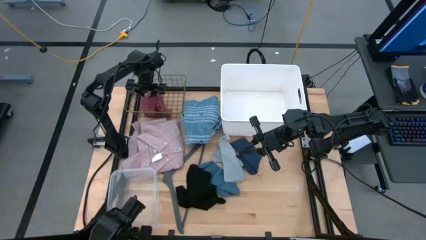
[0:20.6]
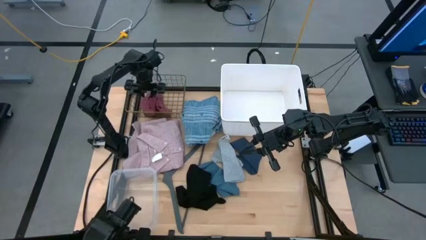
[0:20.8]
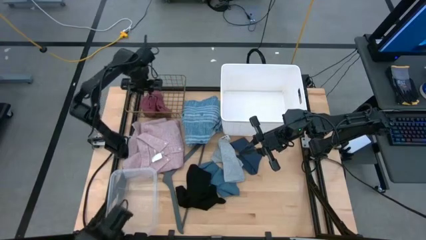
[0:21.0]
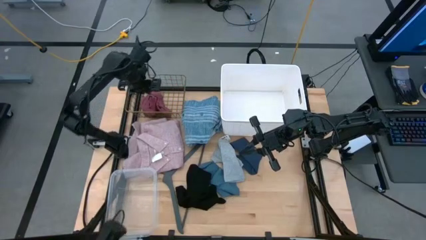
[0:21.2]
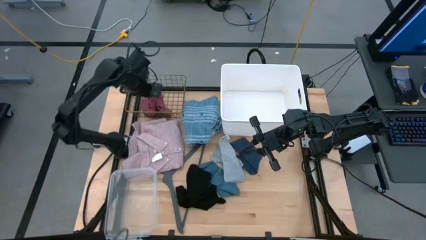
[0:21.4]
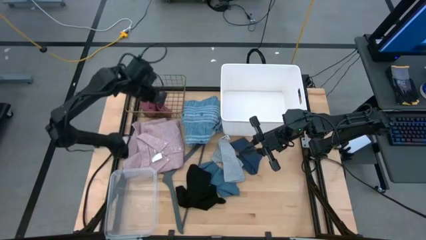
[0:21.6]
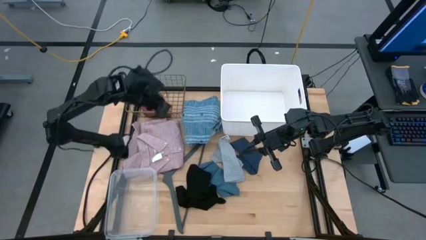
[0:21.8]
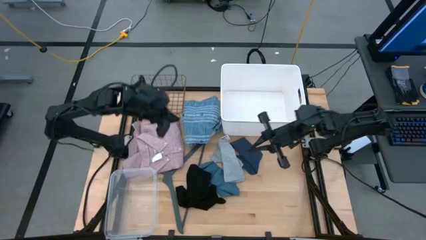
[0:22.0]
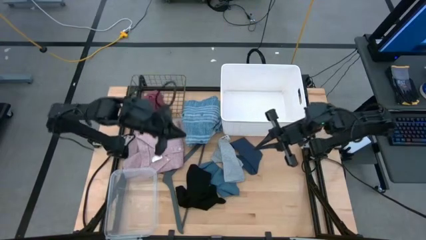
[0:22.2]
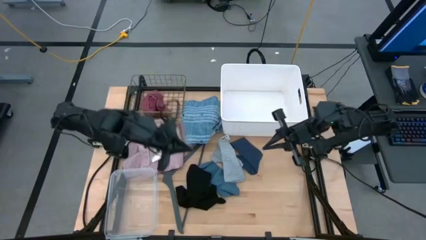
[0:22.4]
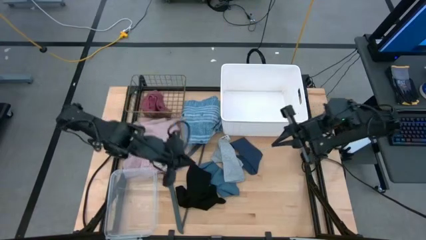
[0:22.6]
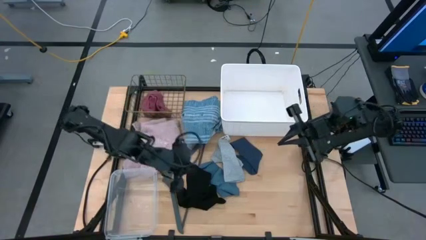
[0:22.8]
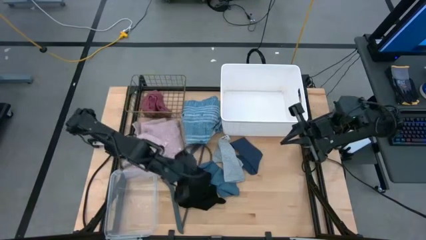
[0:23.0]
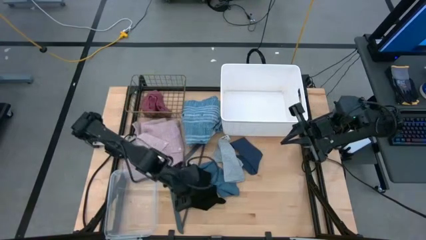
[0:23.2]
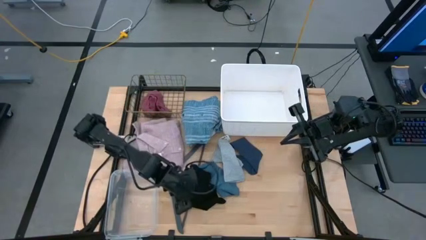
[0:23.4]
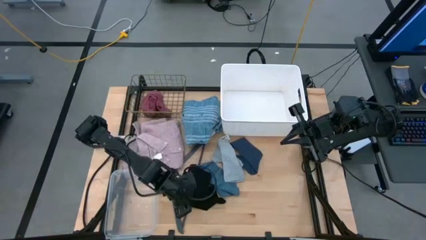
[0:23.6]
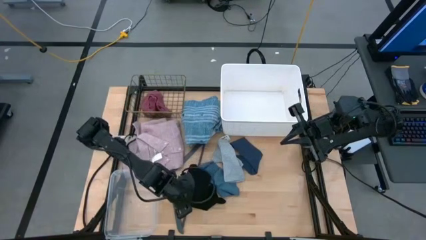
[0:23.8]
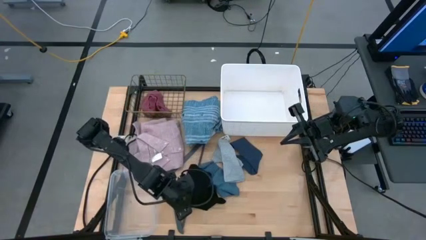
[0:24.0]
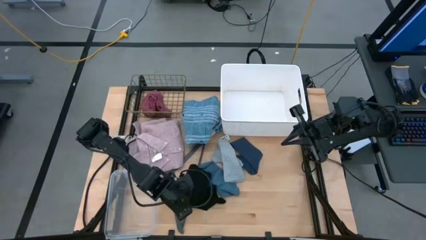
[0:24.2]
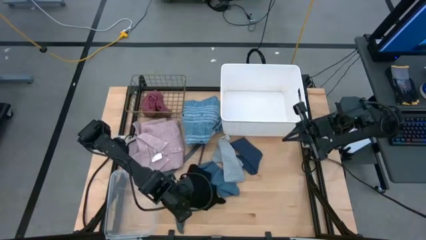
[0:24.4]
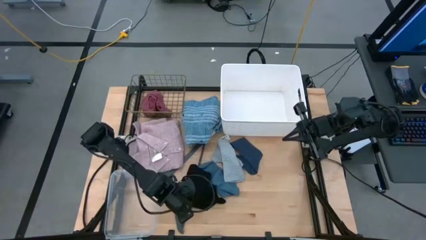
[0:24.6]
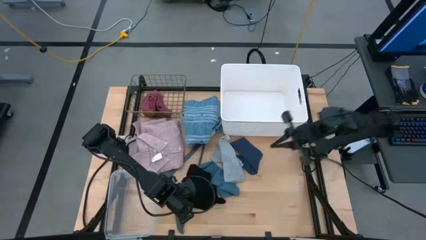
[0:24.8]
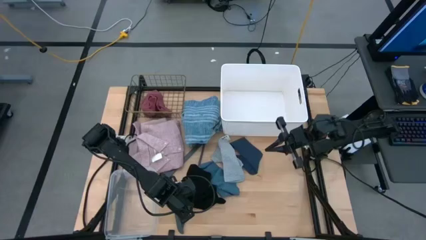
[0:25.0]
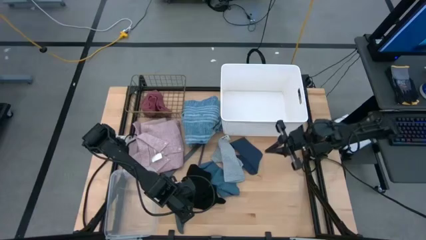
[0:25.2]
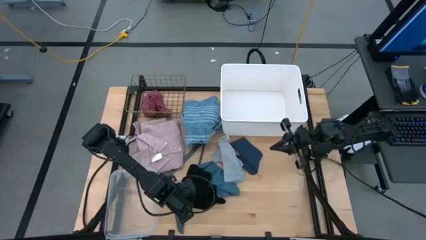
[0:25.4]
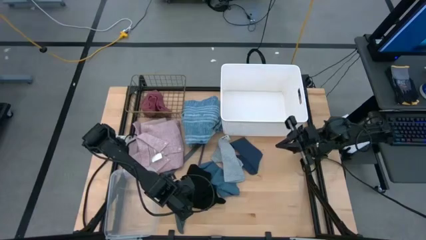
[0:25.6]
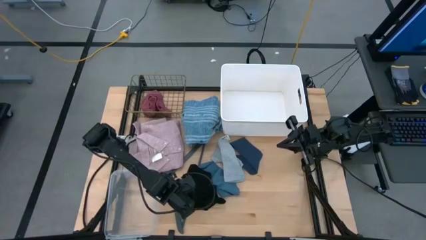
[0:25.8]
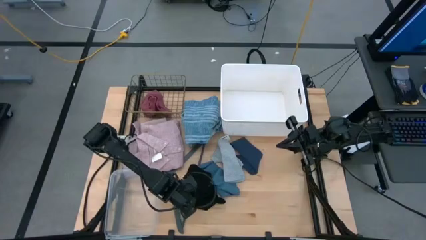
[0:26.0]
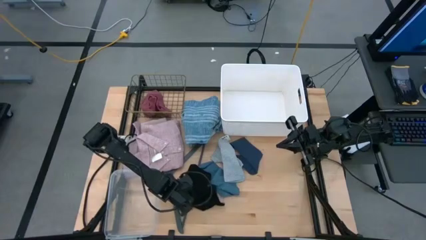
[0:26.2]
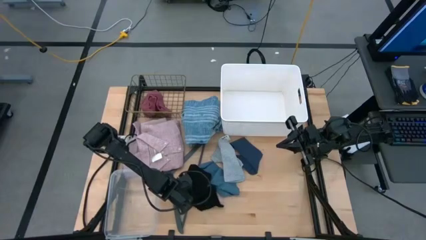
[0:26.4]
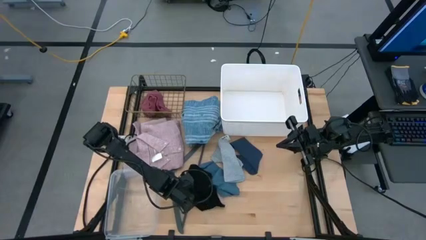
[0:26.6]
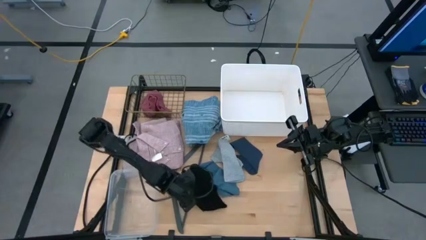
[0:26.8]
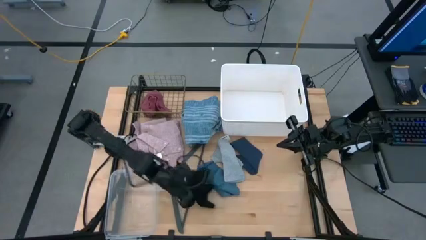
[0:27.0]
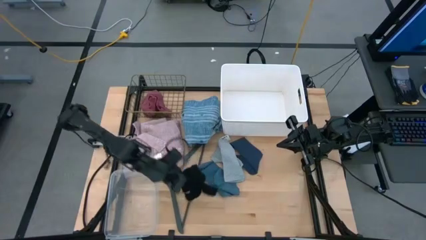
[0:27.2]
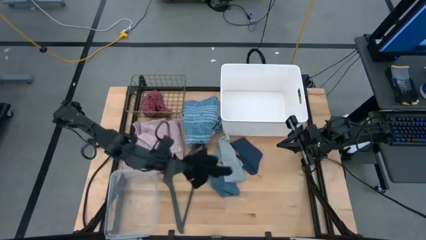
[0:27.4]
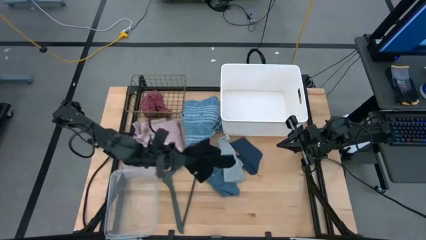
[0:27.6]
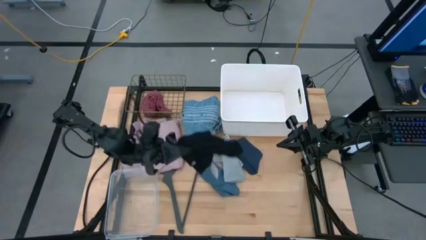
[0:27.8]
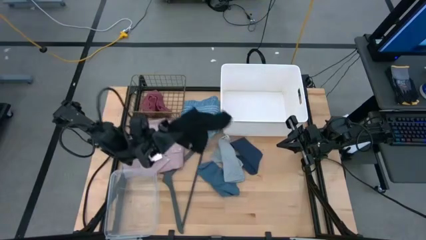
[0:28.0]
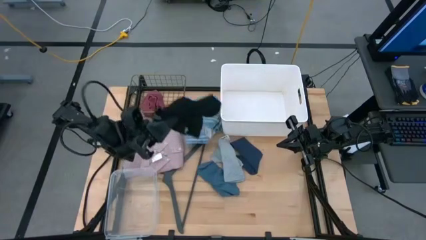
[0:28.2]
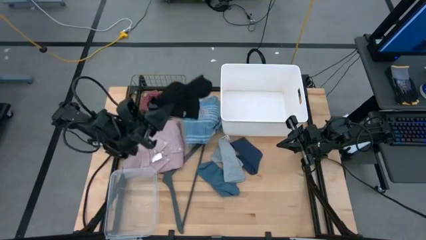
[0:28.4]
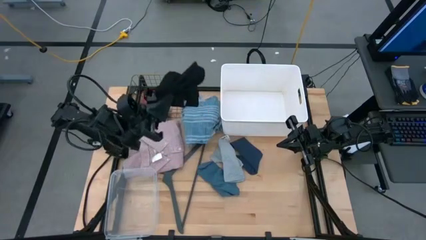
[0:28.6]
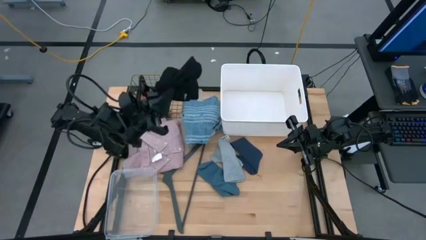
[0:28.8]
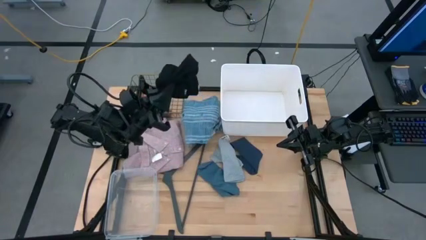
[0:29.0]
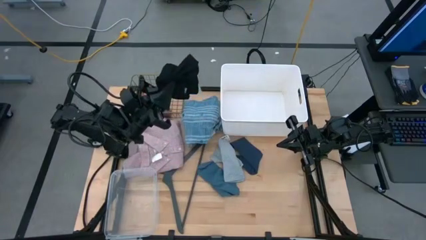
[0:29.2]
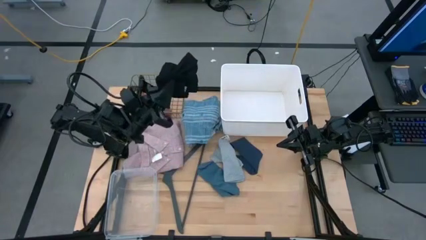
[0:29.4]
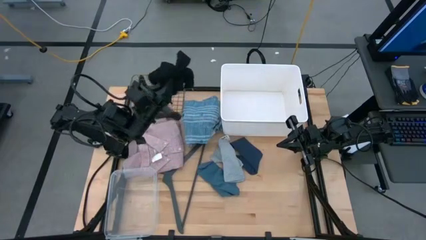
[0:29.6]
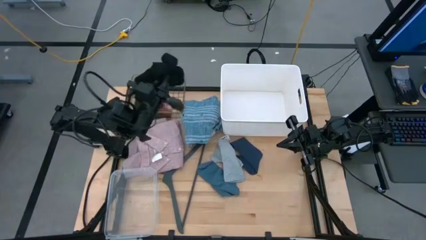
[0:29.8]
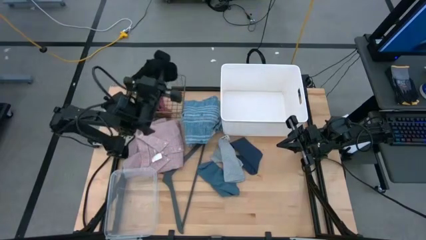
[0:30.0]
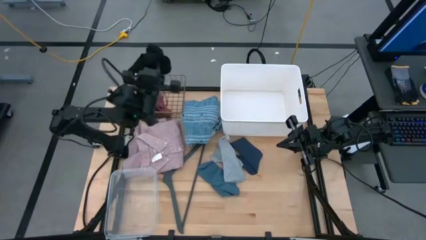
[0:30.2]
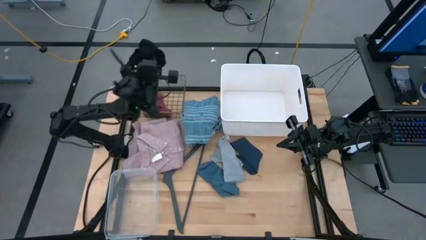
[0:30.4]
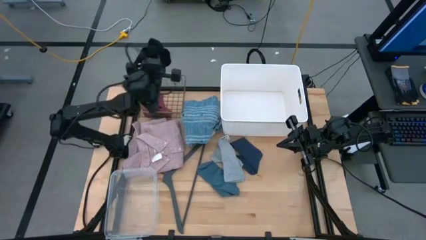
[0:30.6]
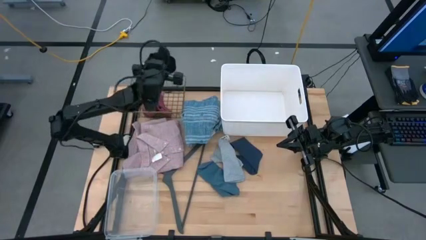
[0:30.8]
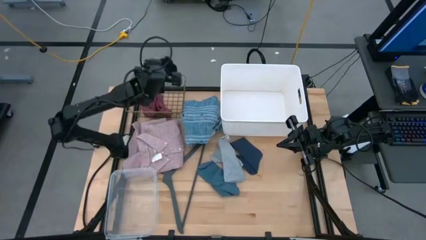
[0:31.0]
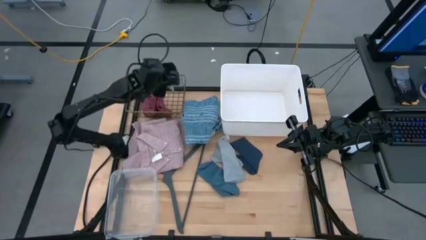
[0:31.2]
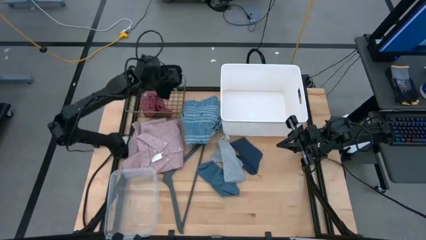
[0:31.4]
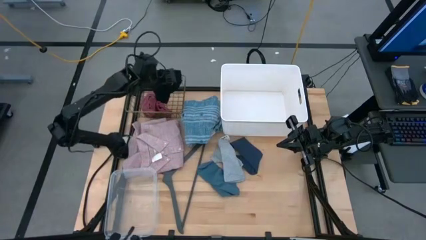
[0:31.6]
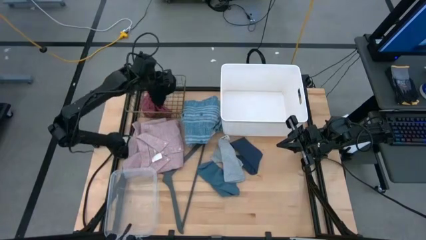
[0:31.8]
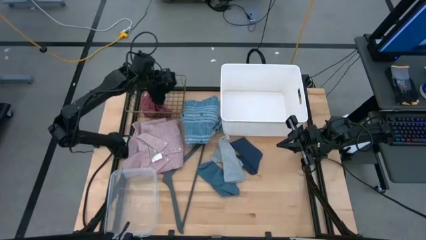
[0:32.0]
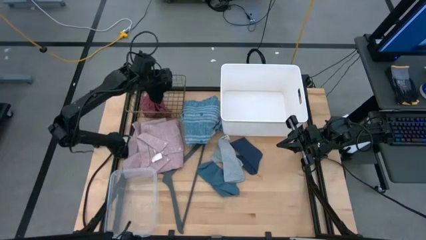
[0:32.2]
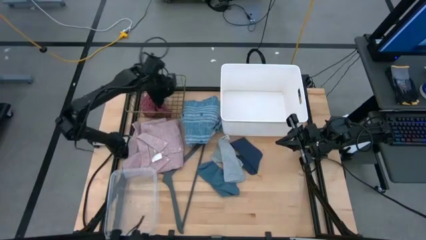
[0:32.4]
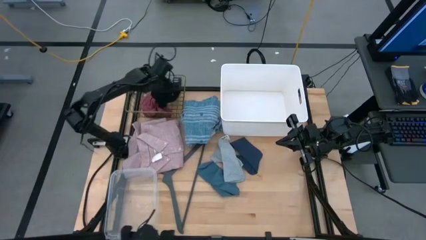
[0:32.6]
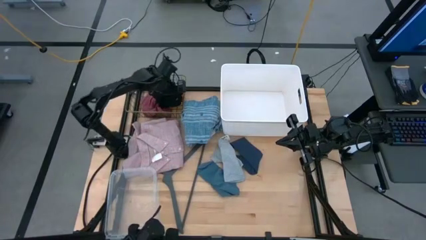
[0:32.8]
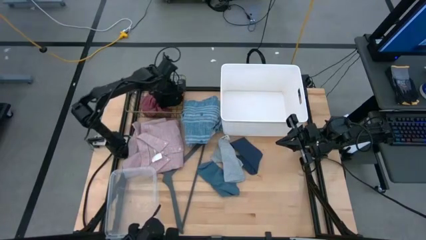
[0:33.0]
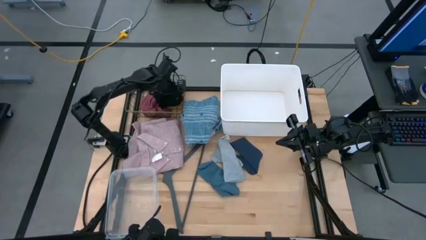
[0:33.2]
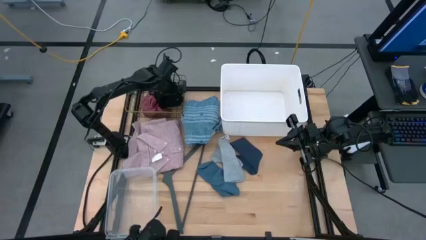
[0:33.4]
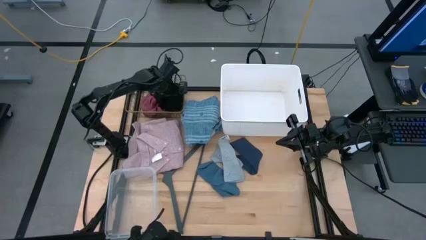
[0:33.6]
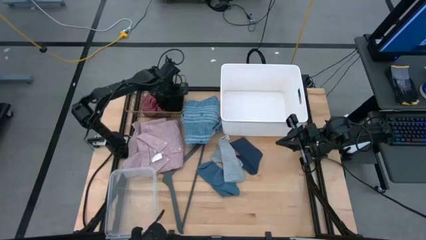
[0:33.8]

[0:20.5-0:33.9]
Task: Pick & Place Cloths
Put the black undergarment into the gold wire basket
